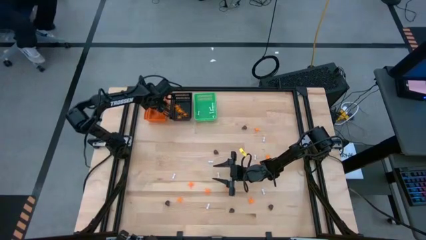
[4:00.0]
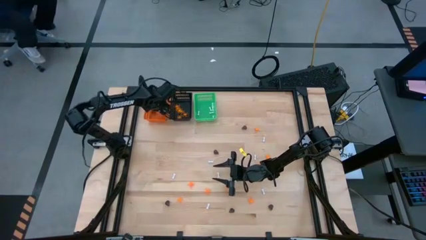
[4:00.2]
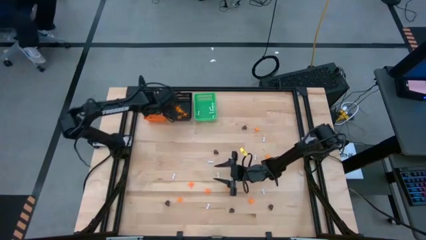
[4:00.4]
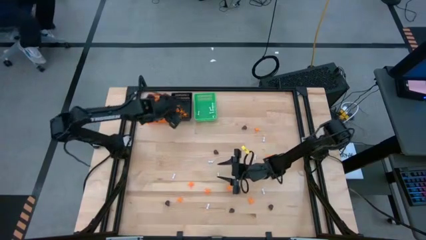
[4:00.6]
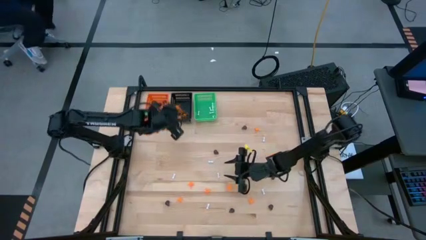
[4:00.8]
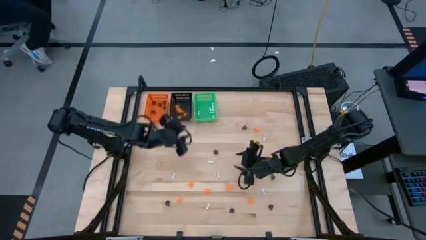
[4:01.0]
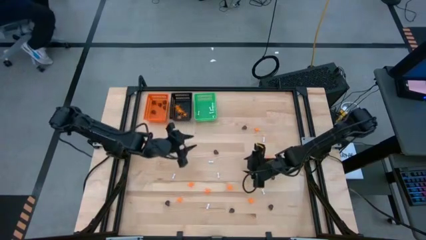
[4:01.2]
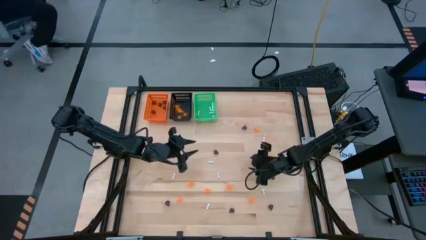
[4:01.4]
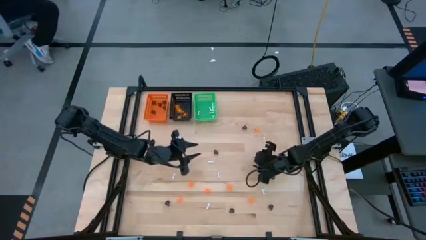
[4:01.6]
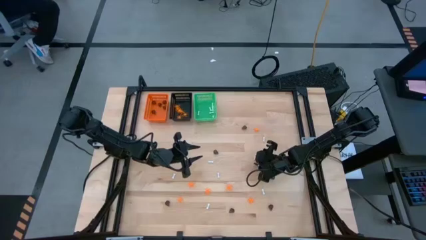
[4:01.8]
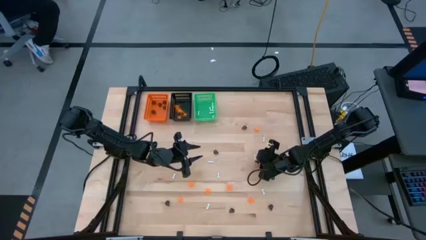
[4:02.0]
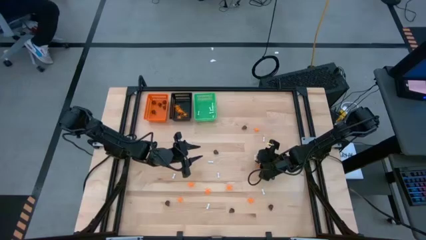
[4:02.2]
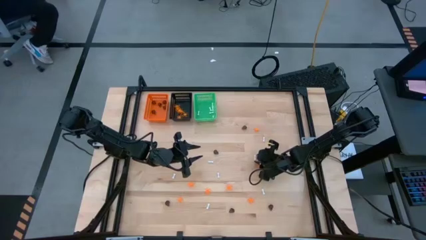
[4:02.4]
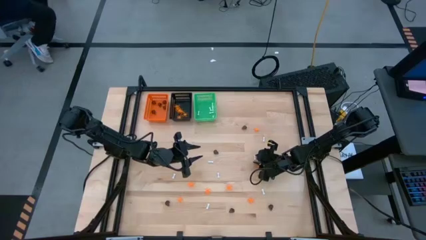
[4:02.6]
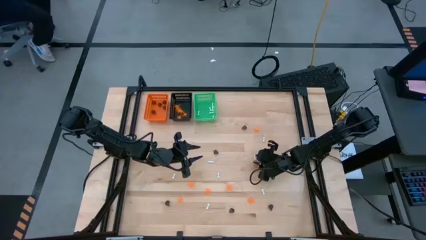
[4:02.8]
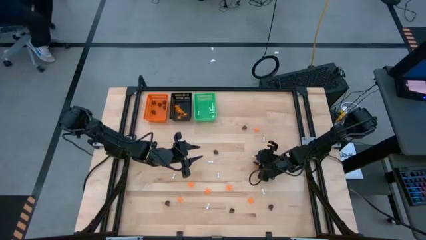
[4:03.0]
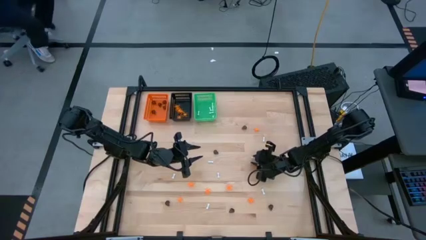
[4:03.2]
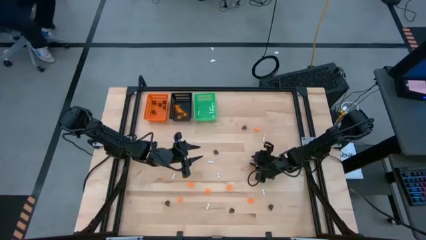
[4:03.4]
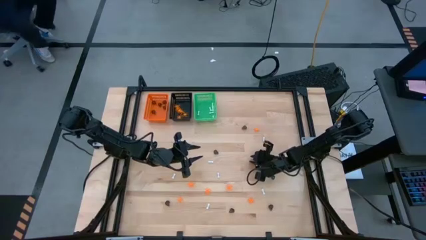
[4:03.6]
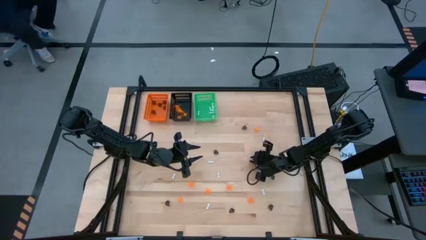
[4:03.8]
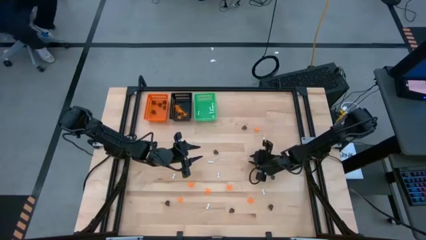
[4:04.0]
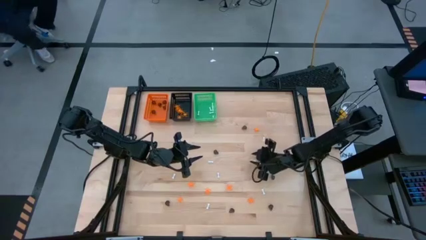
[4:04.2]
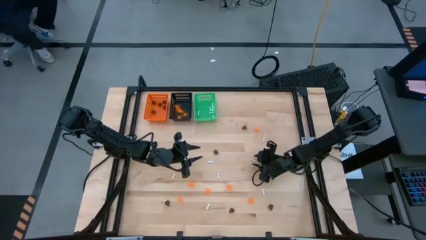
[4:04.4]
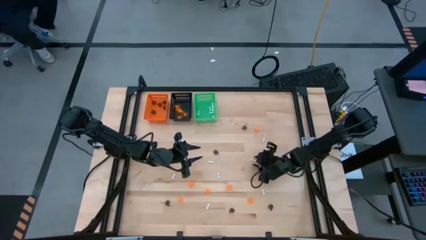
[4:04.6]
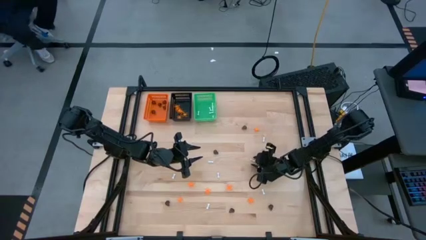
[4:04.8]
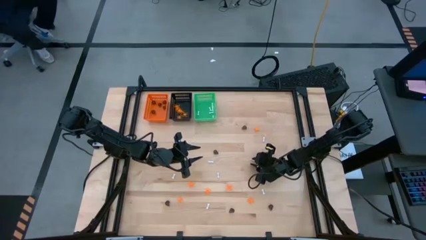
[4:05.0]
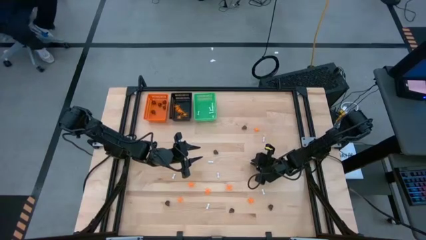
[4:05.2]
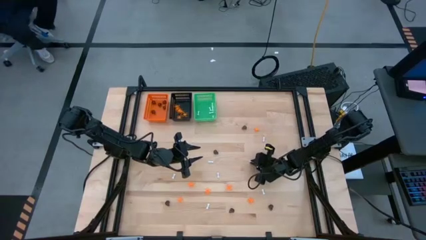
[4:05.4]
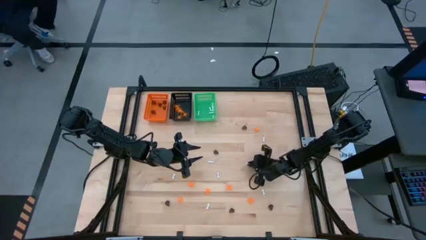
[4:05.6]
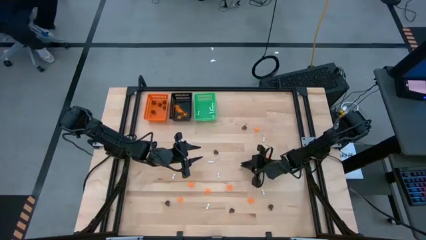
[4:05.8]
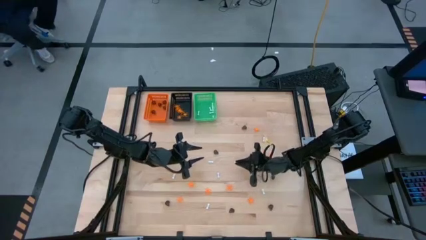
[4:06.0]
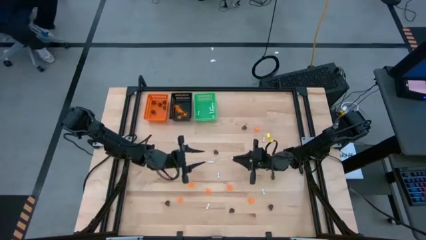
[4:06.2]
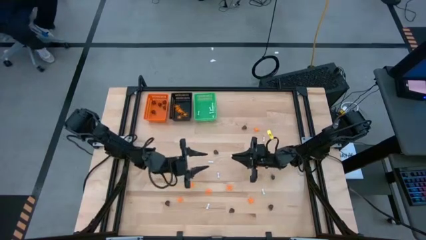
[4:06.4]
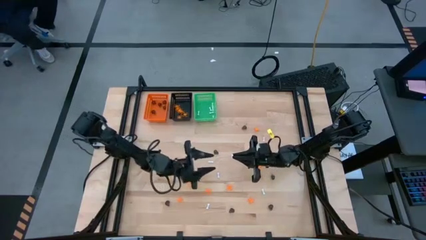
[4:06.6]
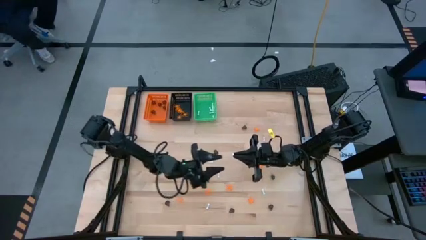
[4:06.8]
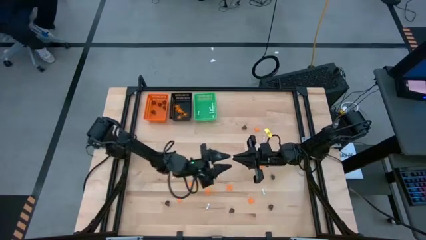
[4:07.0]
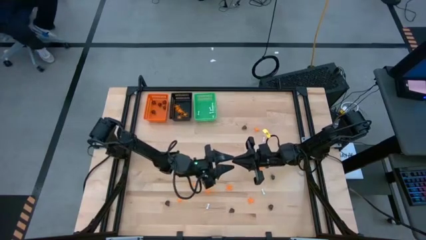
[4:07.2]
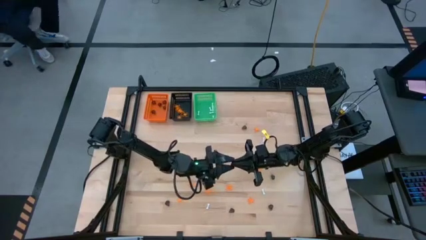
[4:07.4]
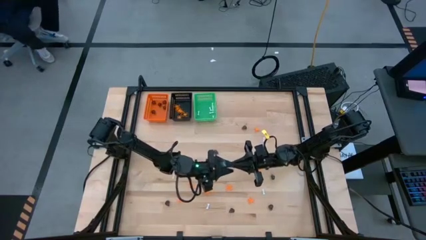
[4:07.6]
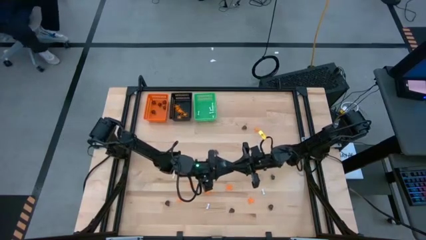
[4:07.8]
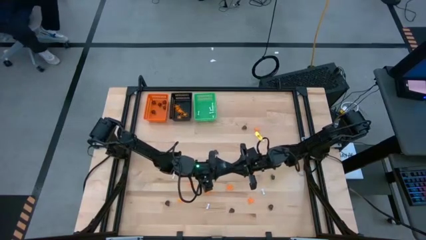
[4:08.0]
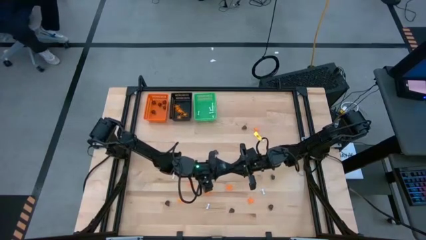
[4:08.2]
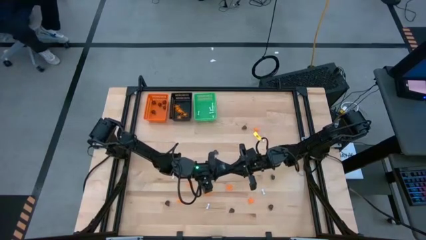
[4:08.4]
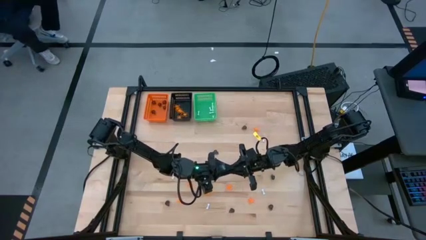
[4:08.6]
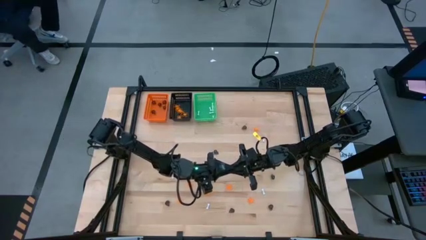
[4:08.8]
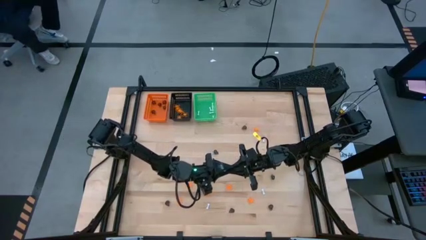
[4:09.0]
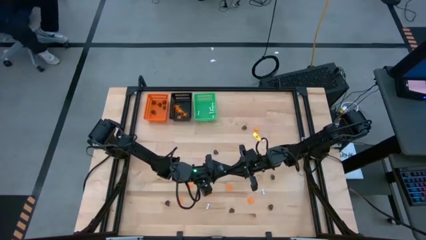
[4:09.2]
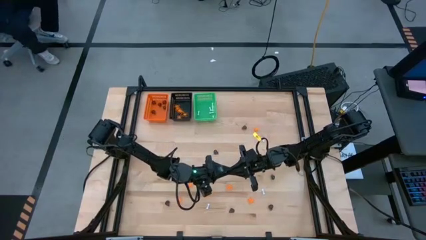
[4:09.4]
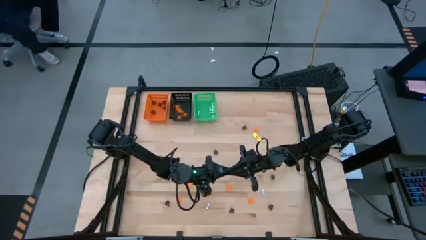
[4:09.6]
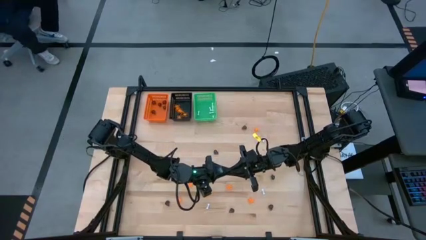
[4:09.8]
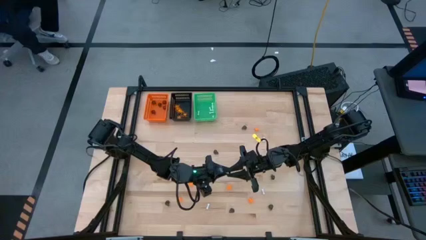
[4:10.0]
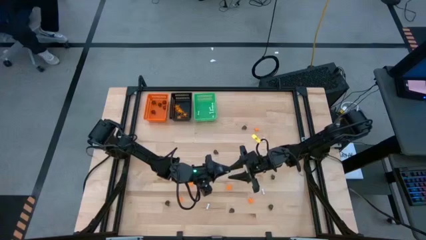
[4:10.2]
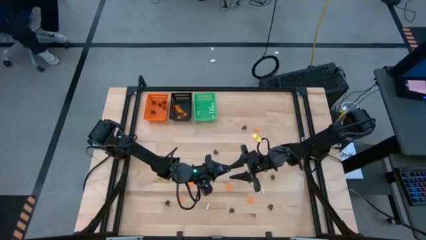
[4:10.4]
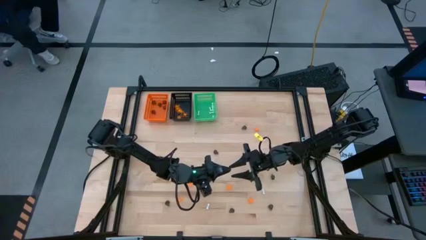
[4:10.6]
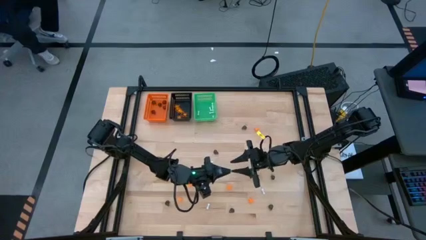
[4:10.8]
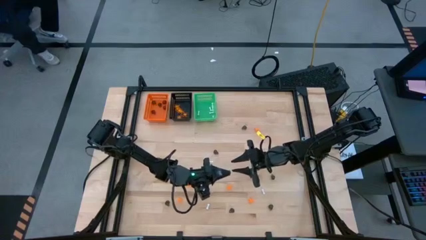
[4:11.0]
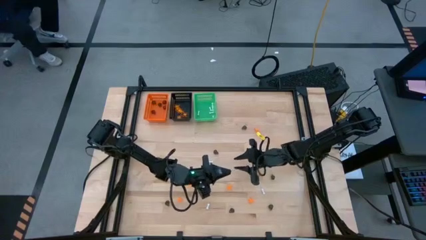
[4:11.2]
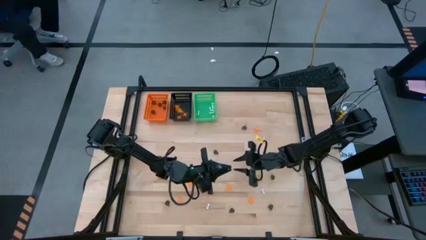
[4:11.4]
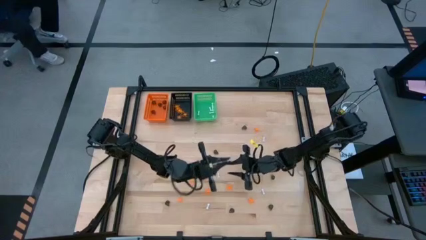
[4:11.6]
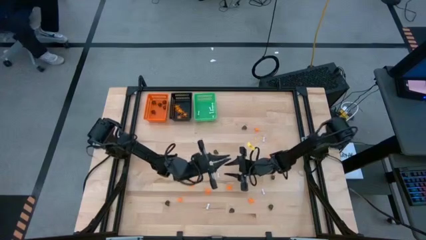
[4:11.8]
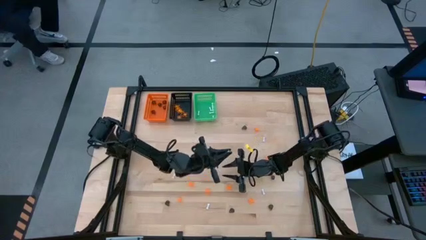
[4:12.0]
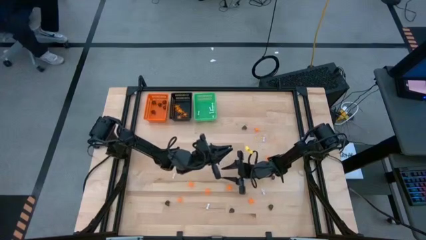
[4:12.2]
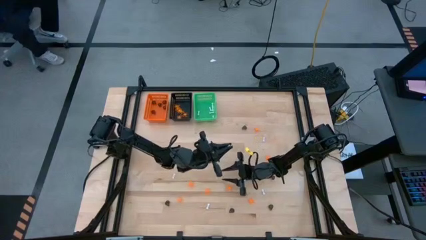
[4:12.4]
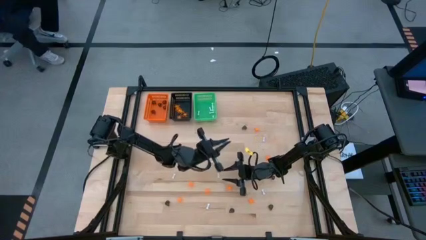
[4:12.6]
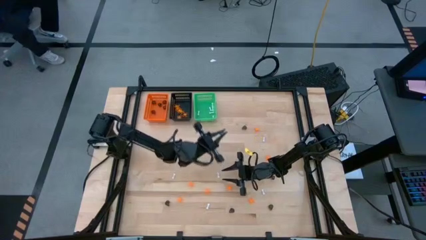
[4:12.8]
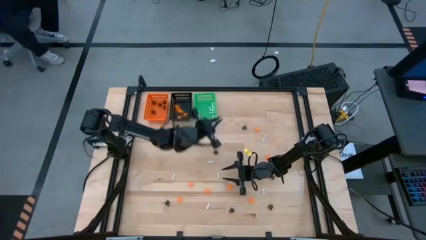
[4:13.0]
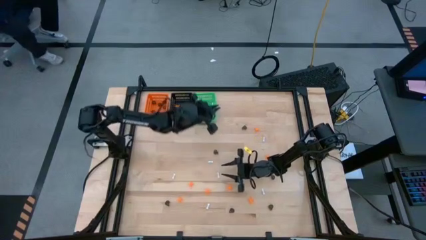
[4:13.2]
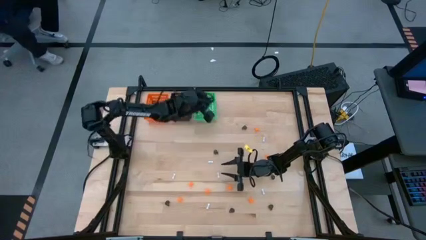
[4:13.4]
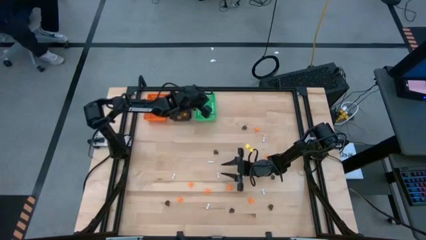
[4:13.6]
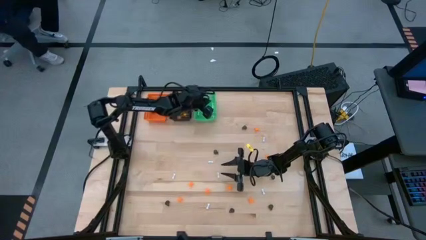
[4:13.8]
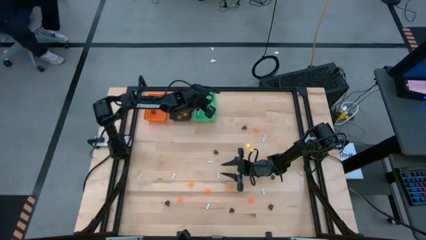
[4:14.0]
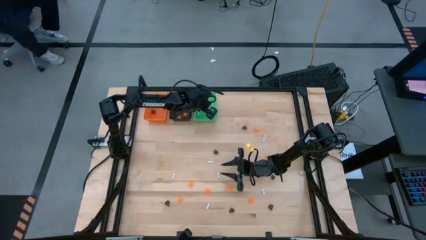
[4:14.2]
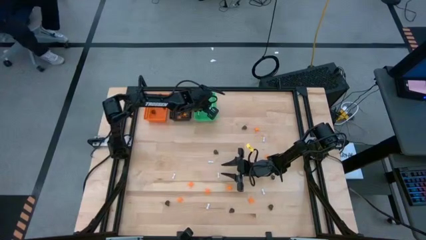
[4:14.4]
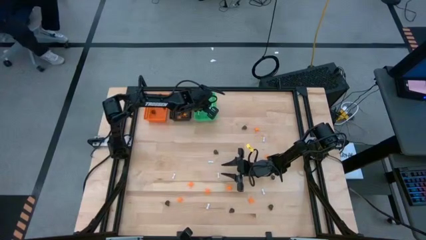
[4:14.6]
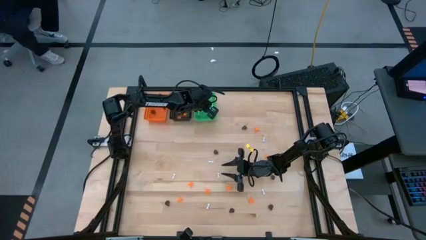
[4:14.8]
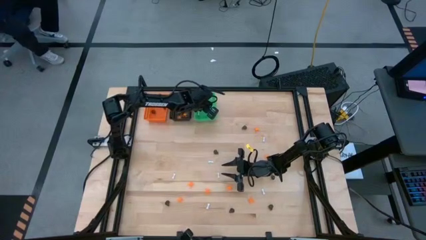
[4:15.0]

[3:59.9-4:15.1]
Task: Sort Halloween decoration
Put the white bone toy into the green bin
